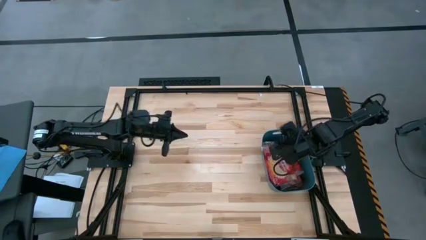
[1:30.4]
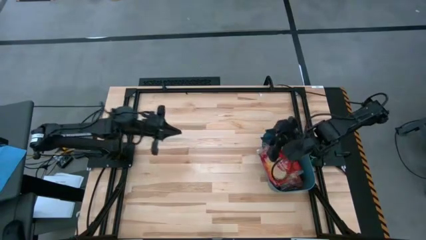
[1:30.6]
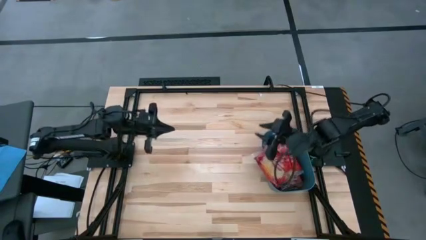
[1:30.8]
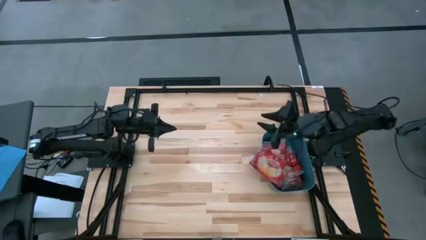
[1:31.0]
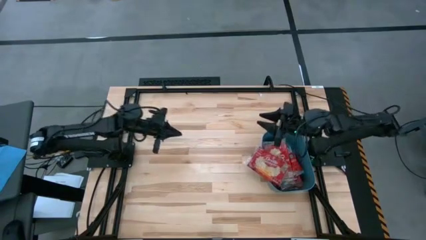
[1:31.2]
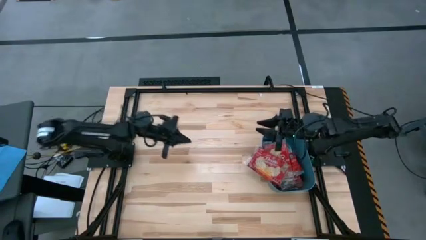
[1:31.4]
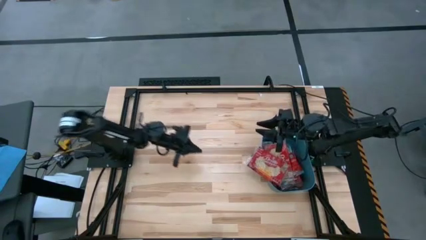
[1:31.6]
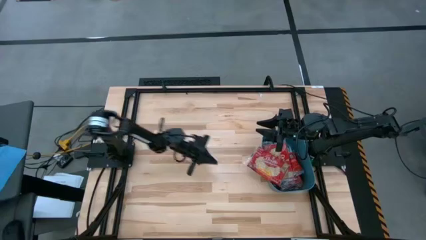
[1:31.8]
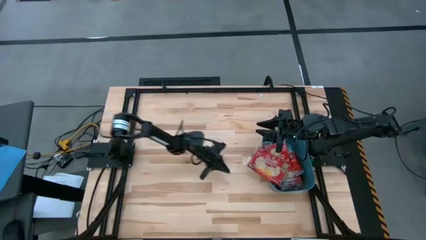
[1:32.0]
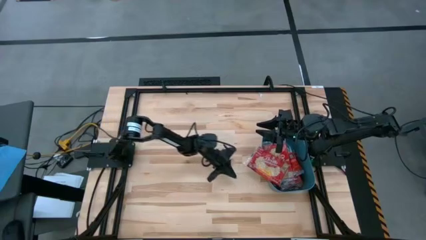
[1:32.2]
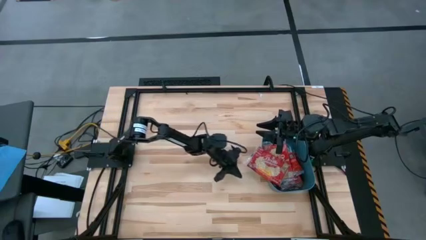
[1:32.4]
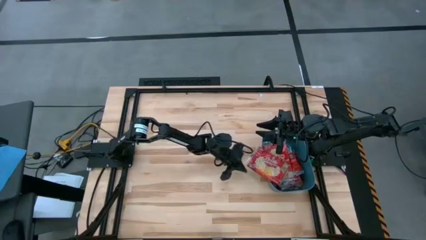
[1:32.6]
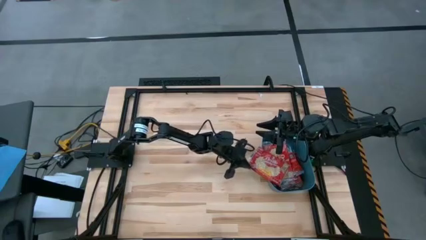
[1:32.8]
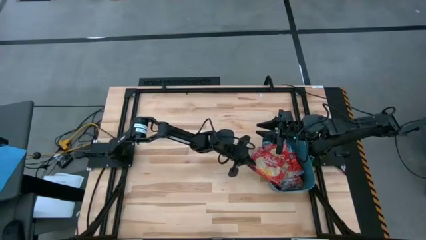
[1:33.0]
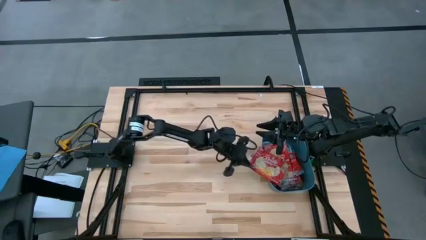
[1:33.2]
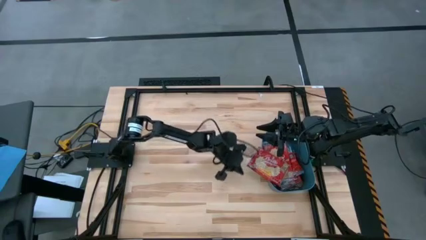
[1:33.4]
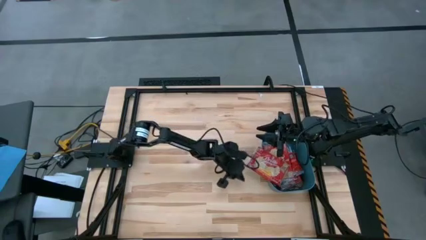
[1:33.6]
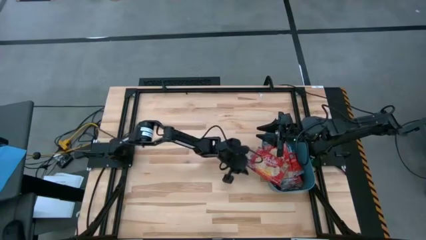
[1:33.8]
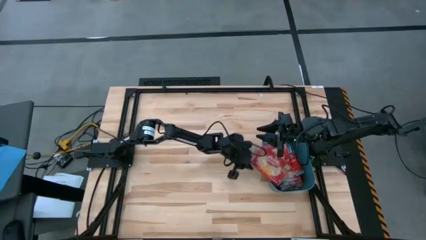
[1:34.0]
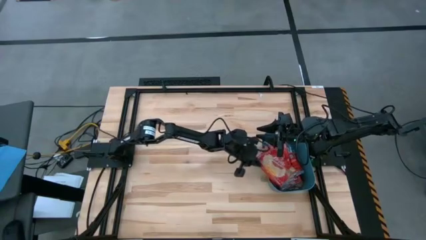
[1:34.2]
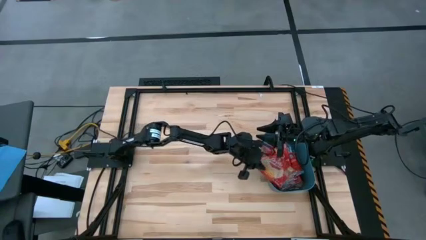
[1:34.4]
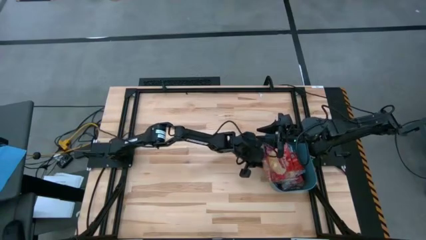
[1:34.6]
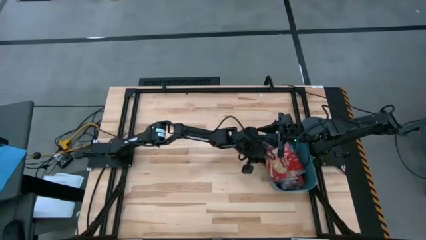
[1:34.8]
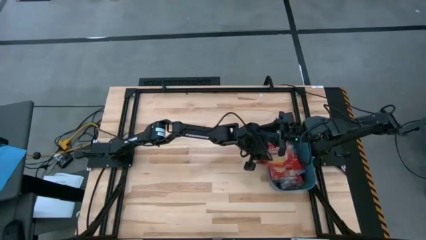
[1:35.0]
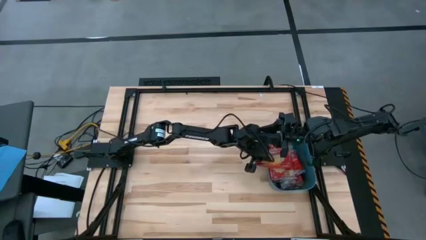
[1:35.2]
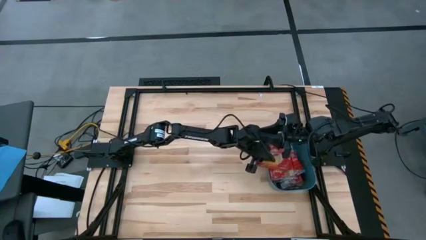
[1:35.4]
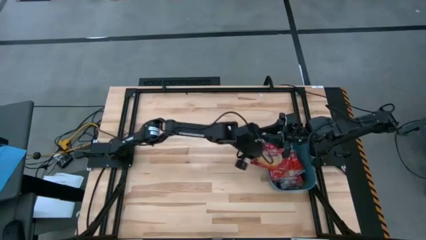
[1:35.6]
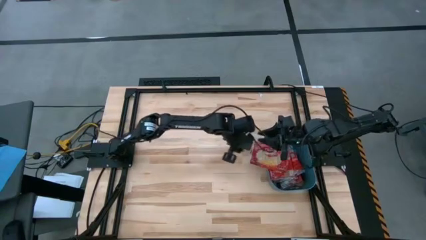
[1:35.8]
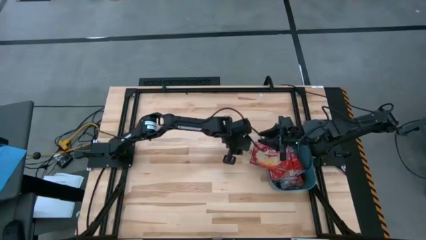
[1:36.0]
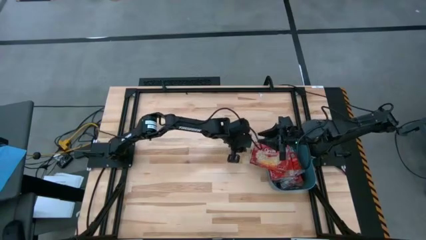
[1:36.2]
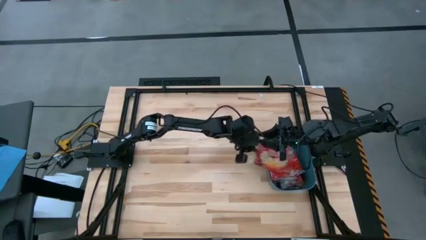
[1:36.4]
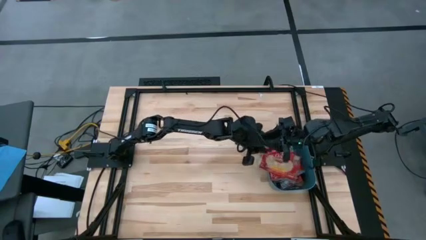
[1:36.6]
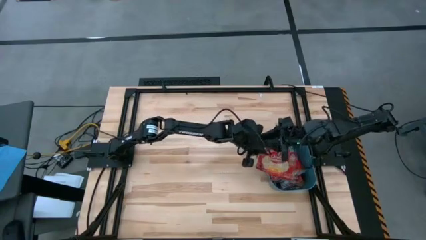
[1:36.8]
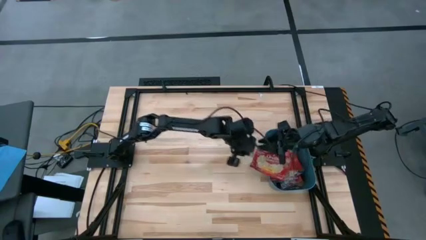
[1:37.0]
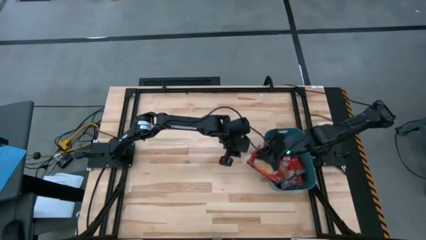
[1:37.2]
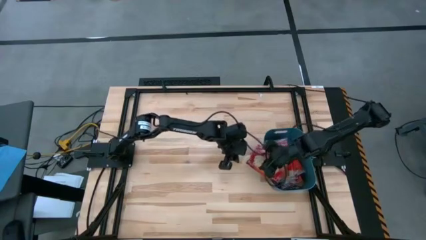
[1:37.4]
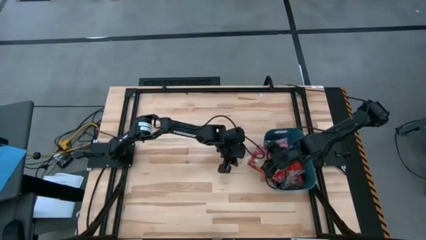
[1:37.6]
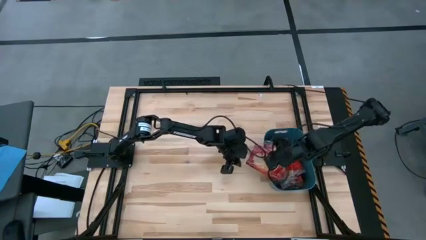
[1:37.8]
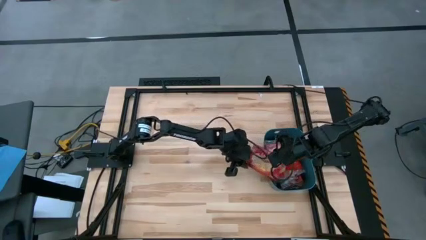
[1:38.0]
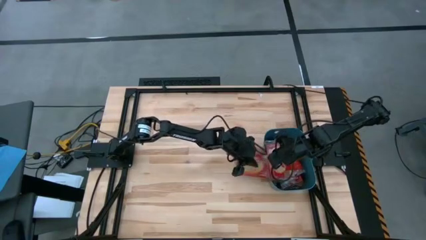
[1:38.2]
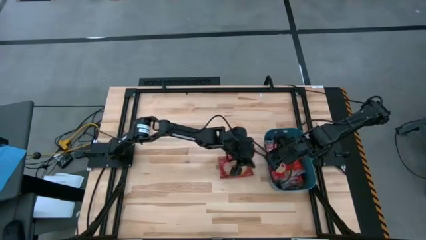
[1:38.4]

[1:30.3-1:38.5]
Task: Sort popcorn bags into baskets
Adjust the popcorn bag into the bin

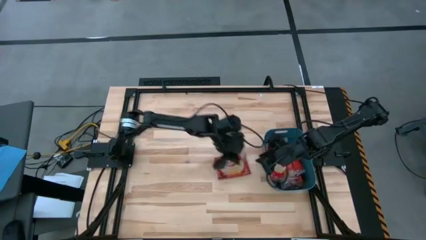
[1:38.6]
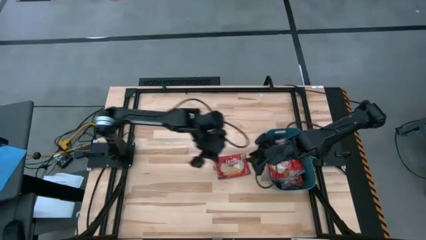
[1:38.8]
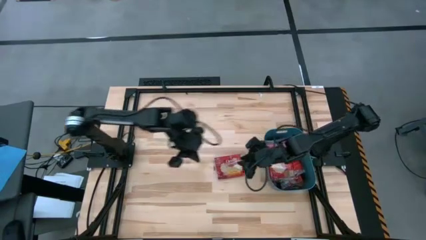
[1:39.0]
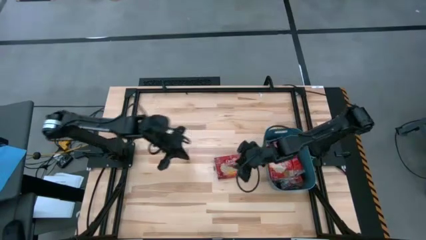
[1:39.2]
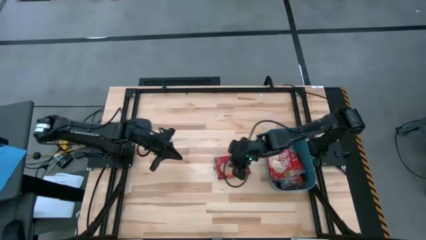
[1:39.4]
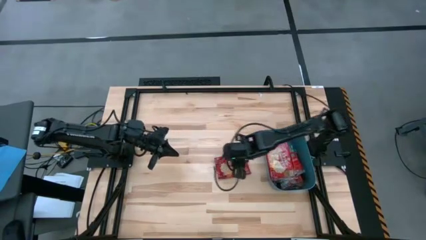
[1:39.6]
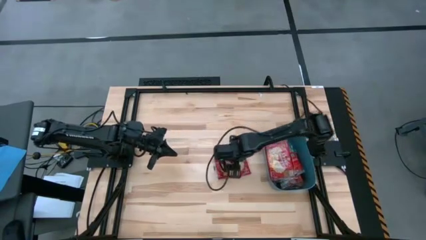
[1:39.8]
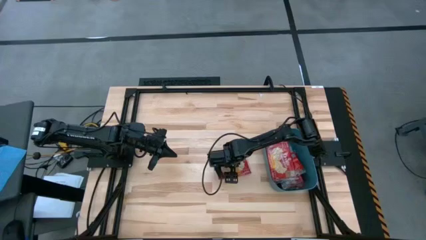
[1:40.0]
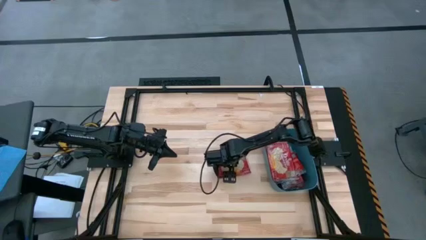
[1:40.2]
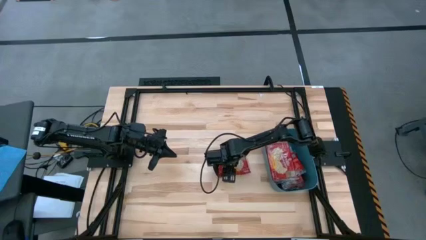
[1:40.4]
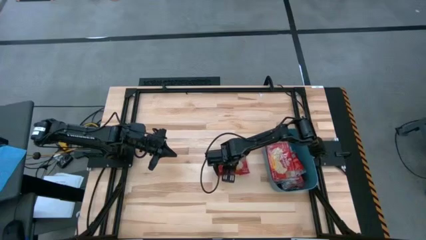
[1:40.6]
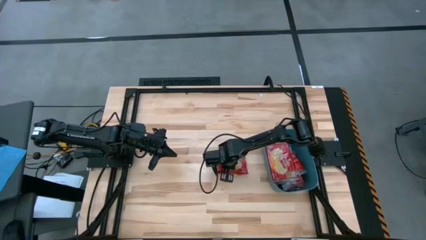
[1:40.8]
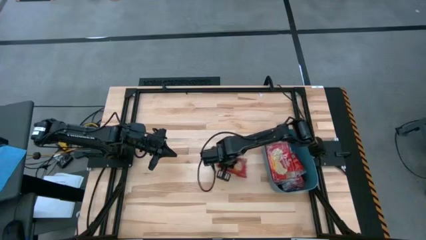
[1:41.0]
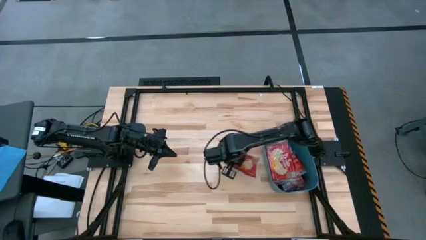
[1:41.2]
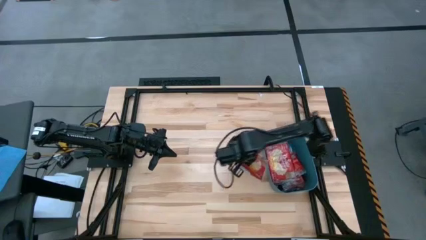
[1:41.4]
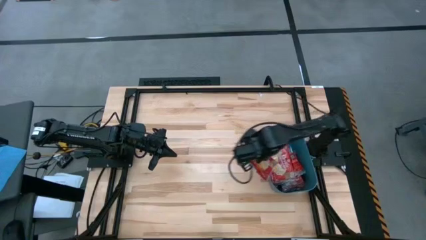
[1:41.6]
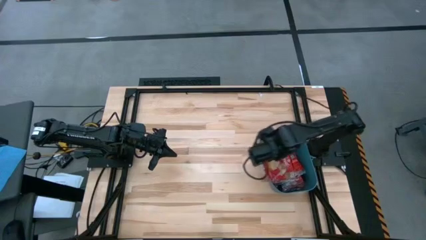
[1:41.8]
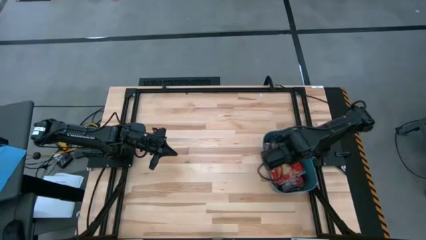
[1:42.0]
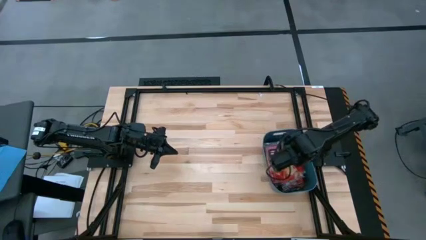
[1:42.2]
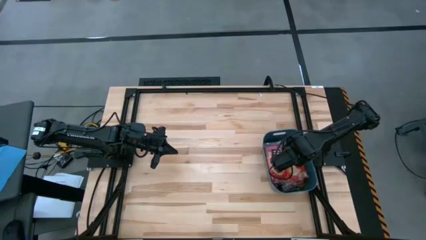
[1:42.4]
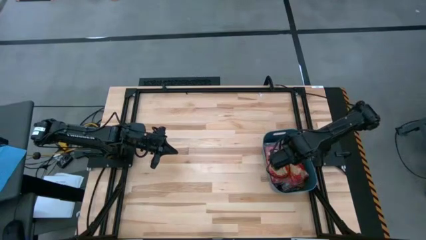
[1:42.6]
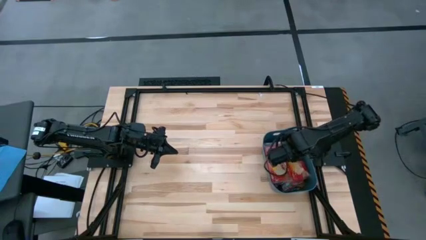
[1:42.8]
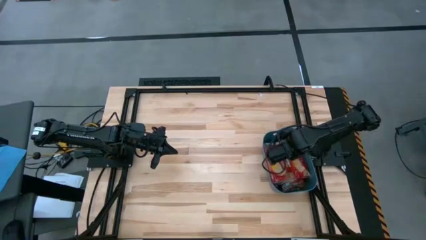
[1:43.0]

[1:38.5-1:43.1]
Stack the popcorn bag into the blue bin

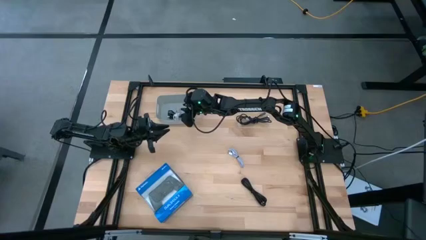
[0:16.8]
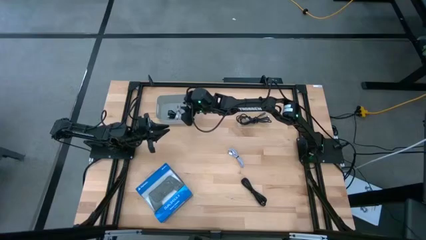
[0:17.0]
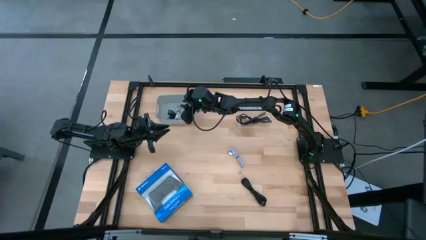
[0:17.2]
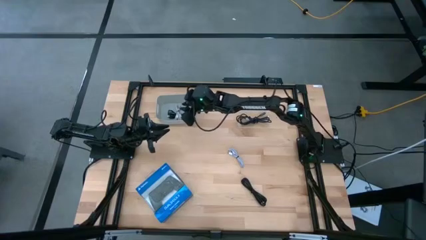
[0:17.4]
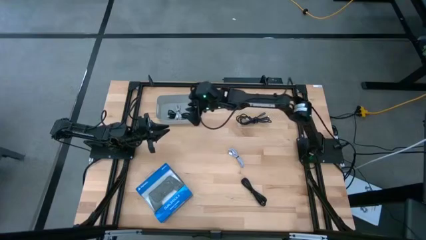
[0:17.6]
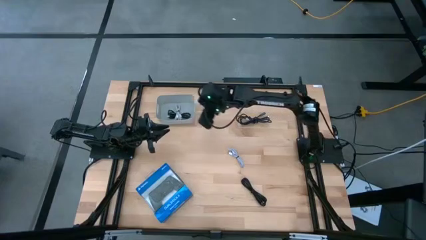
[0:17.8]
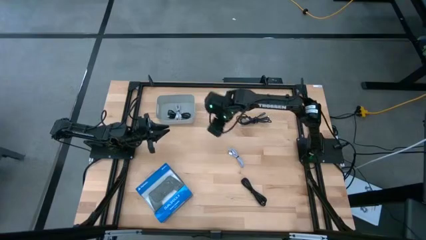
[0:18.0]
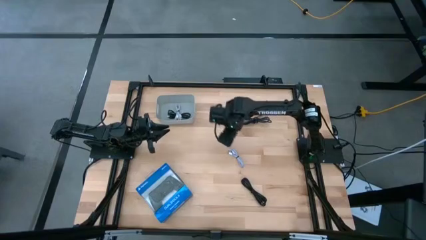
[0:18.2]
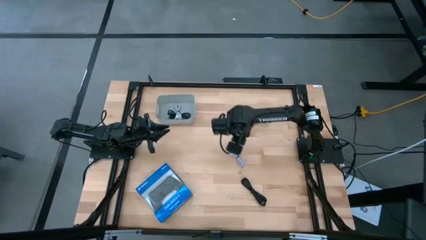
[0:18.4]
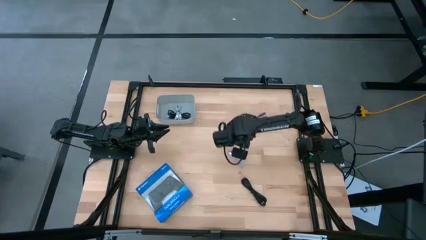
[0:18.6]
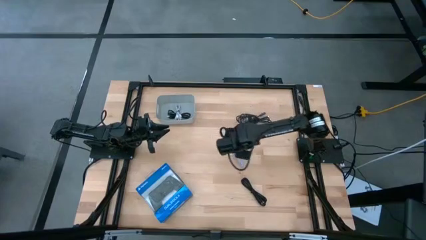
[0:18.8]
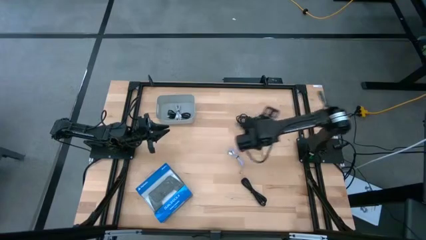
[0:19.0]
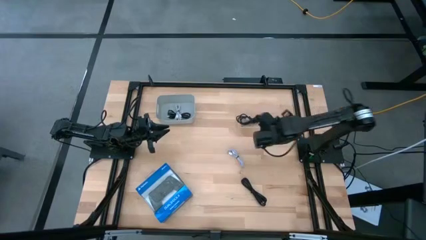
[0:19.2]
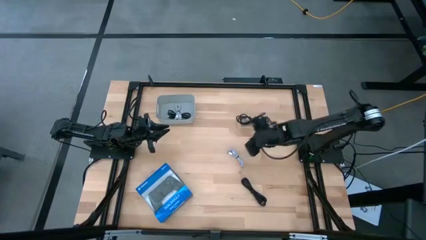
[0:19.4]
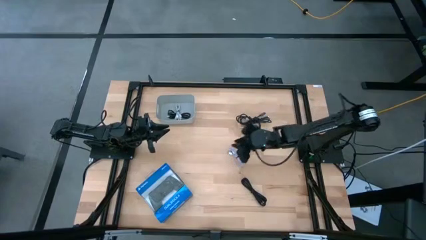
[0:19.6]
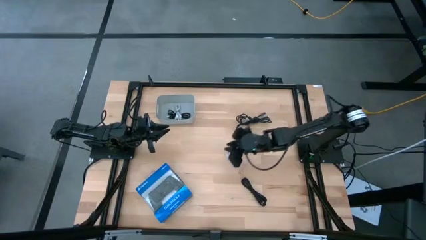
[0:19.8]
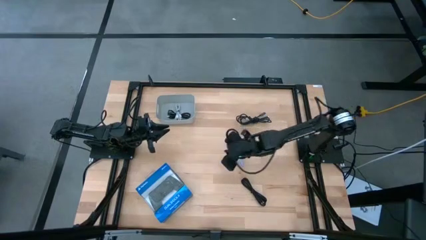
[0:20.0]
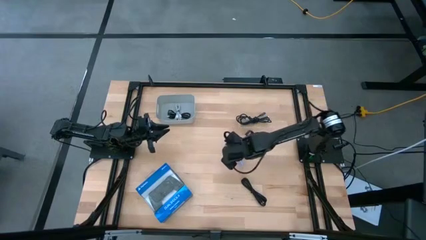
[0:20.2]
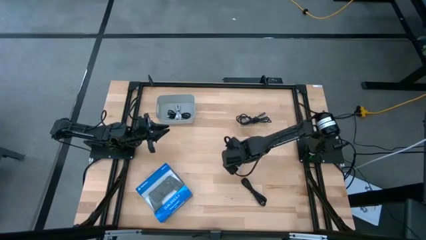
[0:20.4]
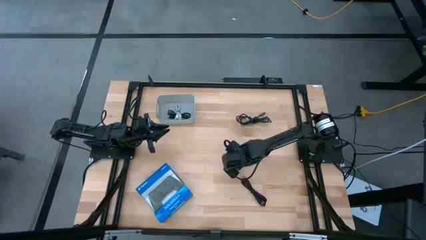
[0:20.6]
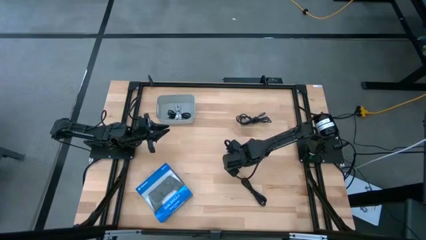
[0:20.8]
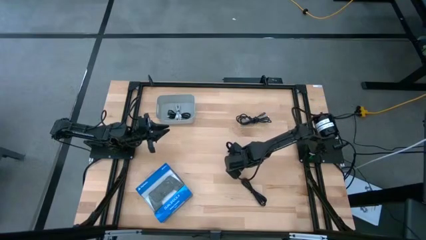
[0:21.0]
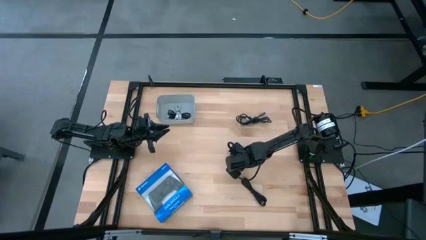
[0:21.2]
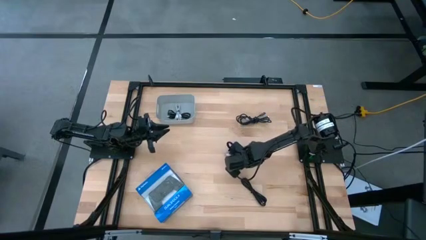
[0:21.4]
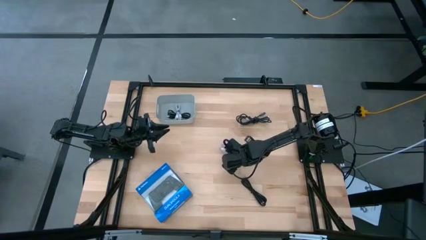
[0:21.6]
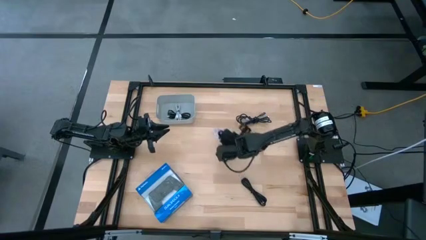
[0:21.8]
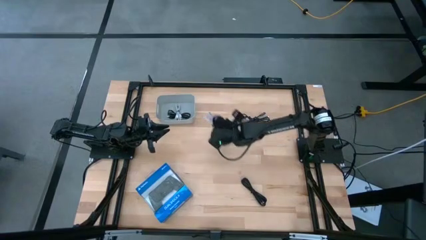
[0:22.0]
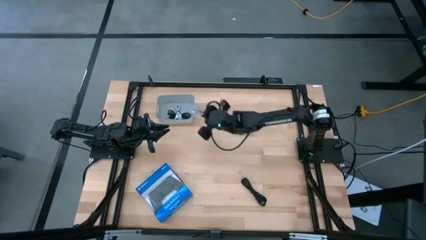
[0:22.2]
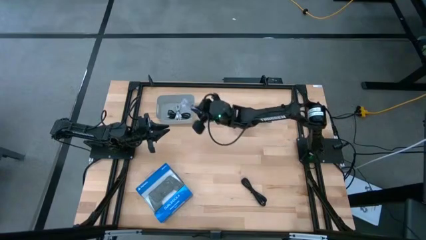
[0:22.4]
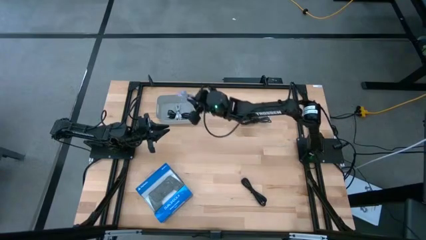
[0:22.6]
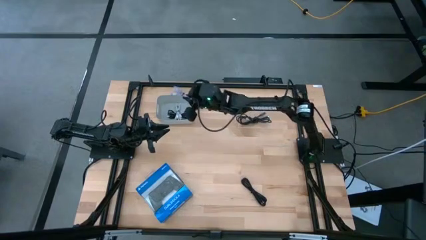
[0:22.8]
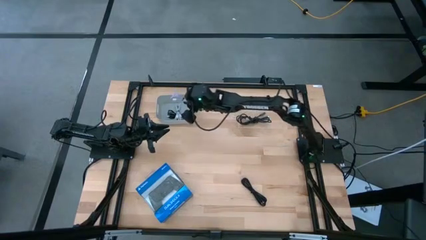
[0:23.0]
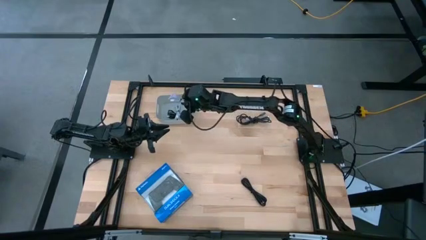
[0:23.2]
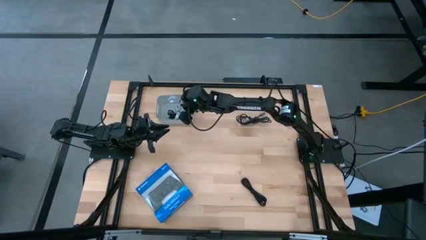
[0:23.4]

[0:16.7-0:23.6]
Task: Pick and place USB-C Cables
Put the light blue charger cable into the white bin
